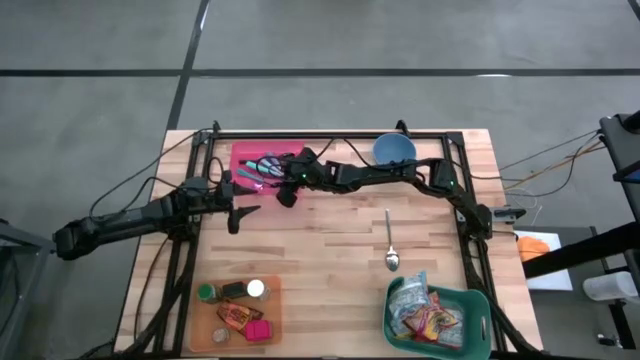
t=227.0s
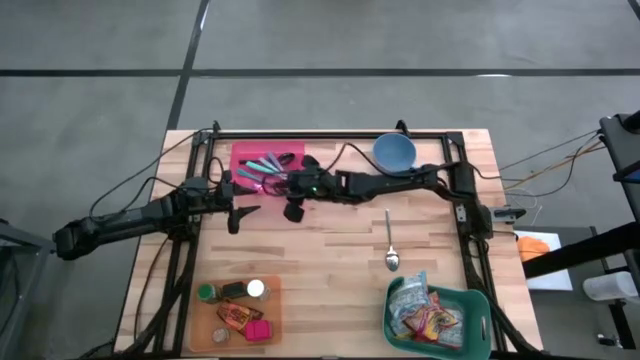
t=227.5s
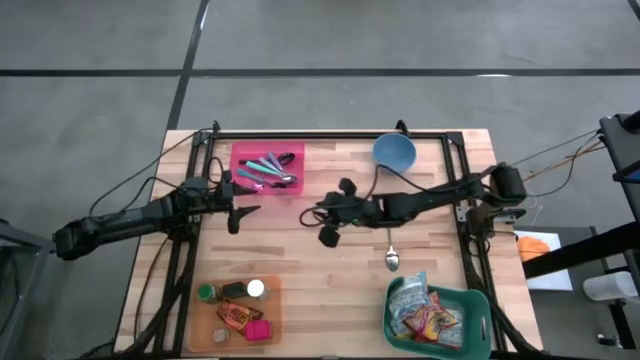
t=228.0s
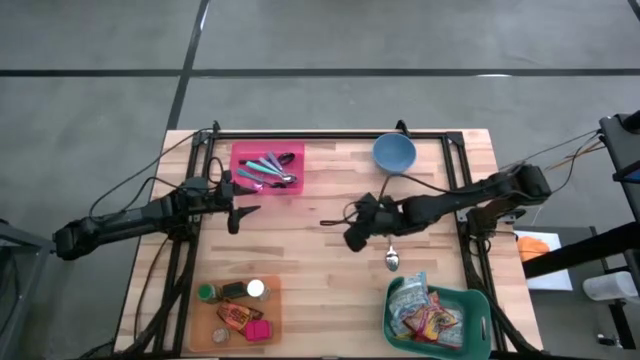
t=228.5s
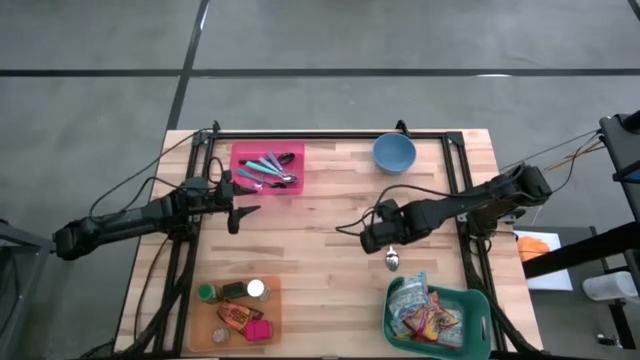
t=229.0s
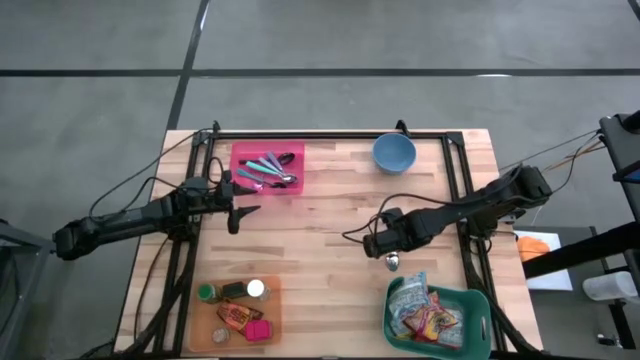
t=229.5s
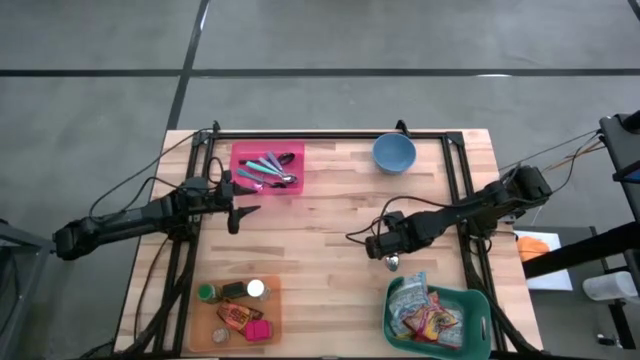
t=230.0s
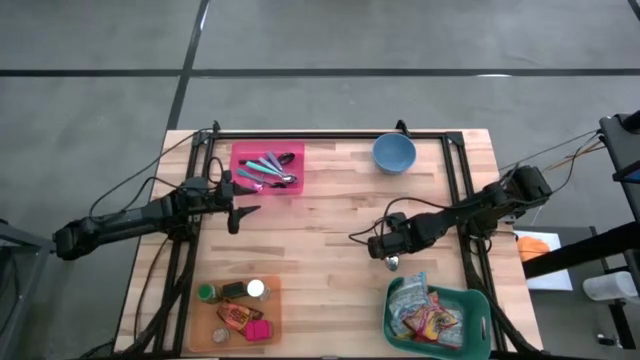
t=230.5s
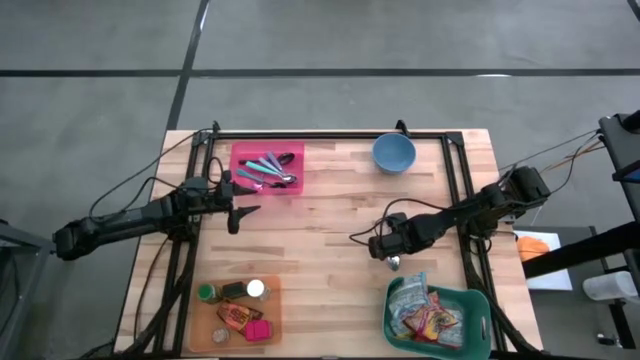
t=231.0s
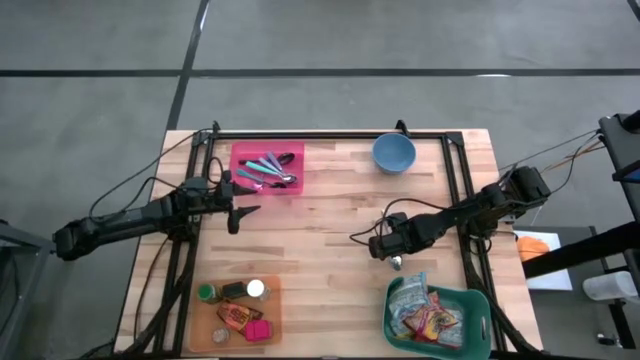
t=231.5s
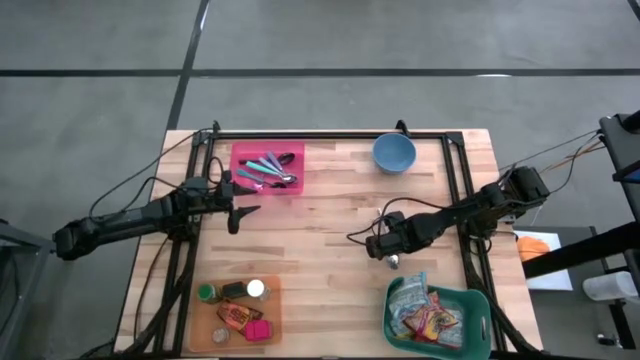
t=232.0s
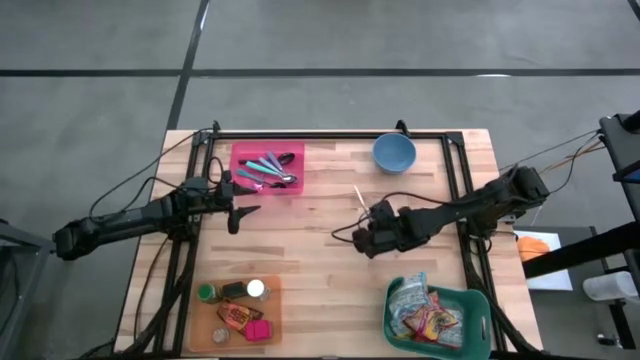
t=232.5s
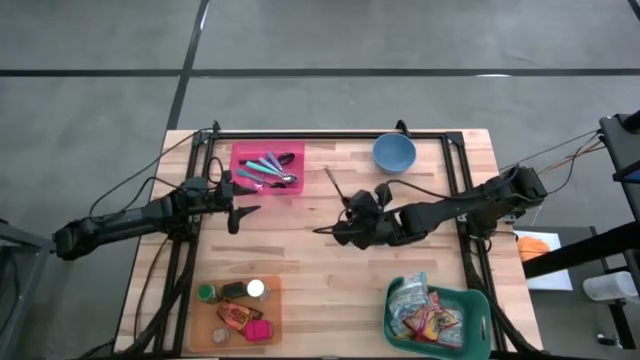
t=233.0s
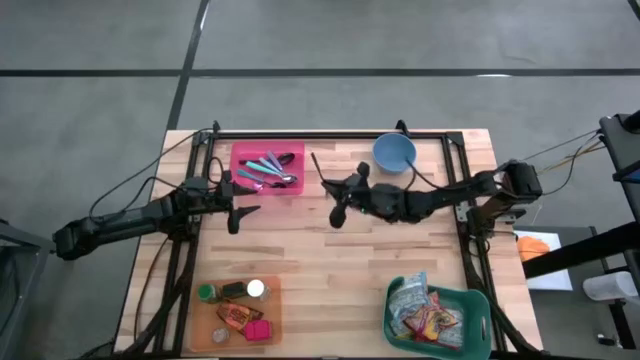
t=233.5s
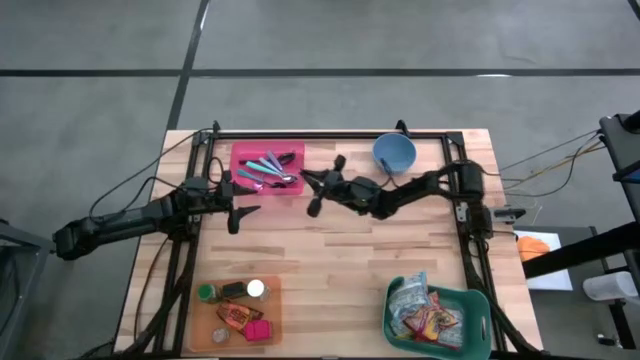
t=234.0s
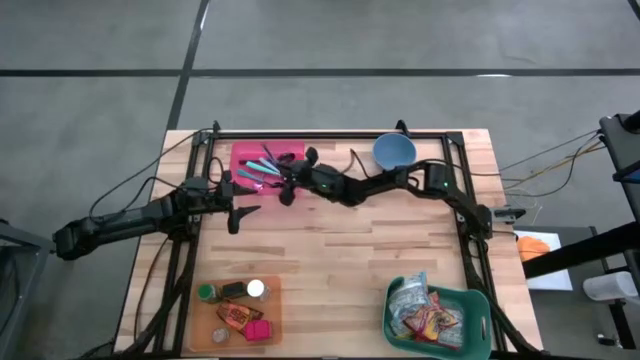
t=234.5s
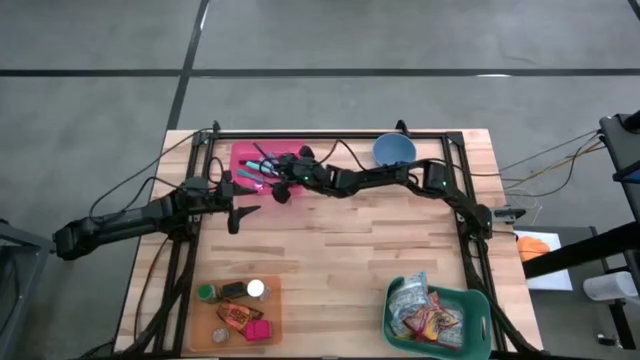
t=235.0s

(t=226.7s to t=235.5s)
Put the silver spoon into the pink bin

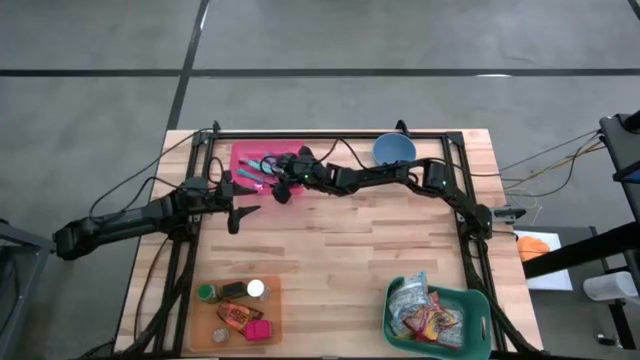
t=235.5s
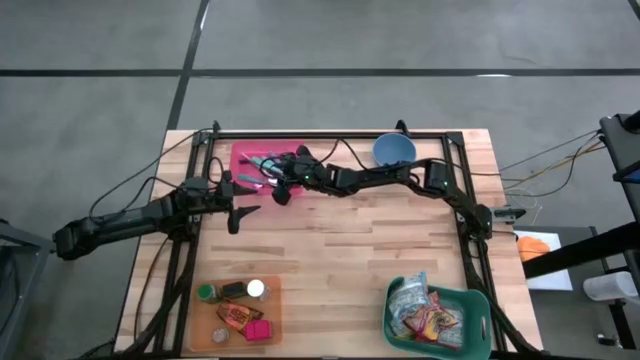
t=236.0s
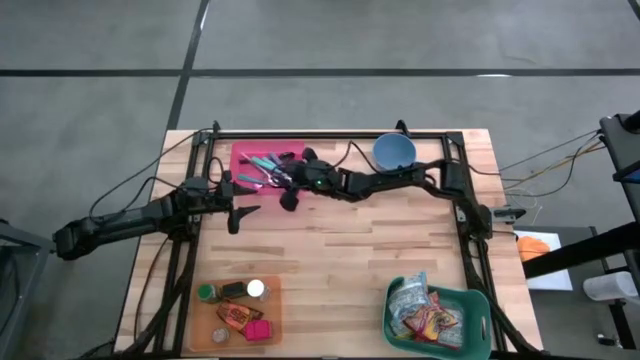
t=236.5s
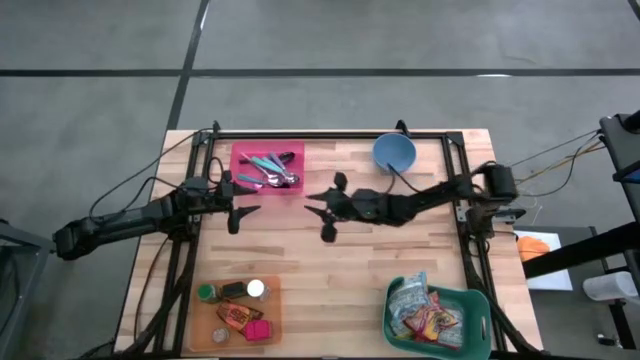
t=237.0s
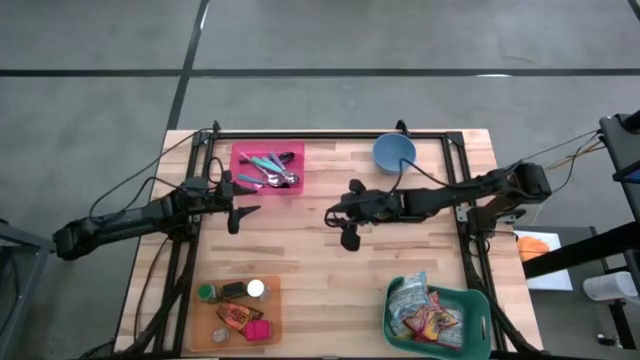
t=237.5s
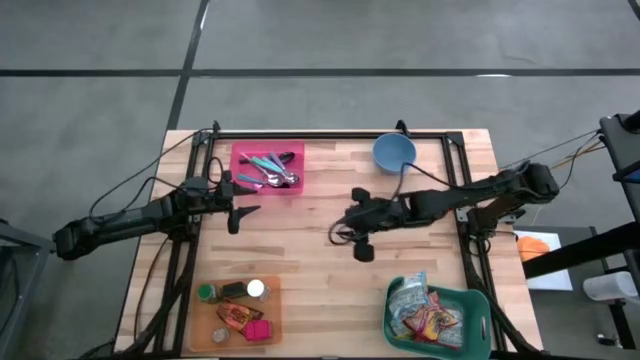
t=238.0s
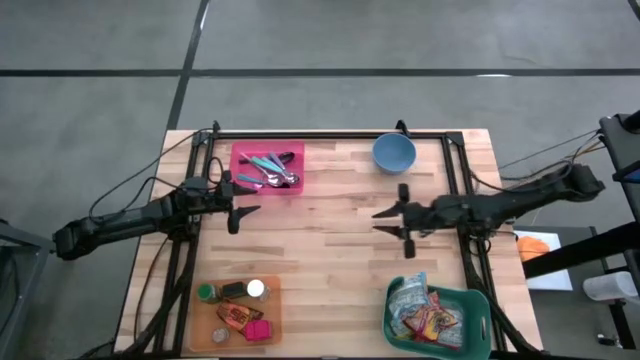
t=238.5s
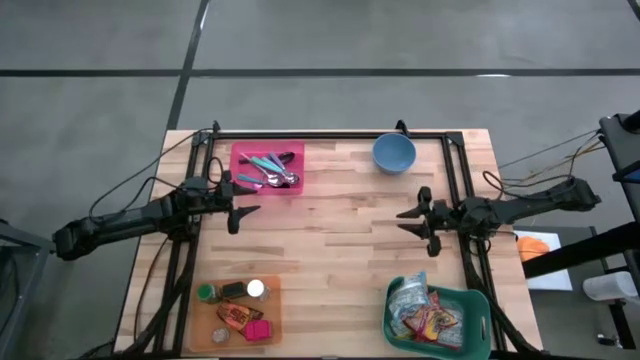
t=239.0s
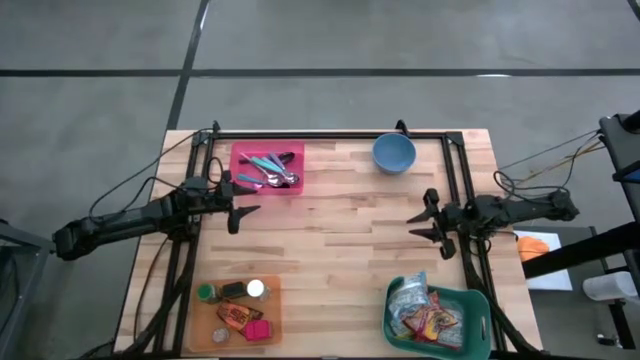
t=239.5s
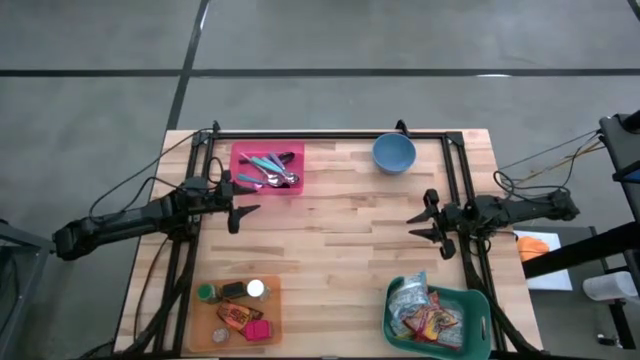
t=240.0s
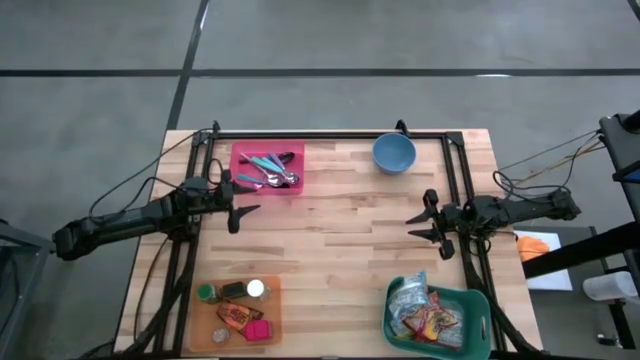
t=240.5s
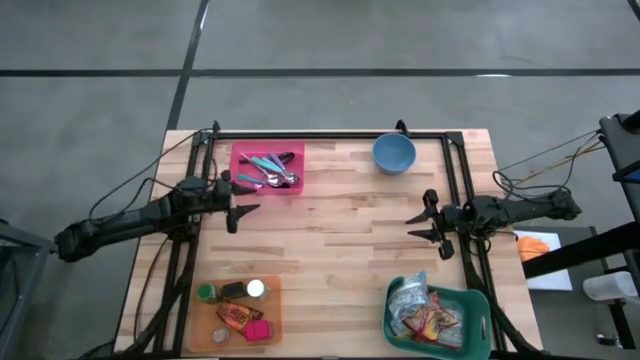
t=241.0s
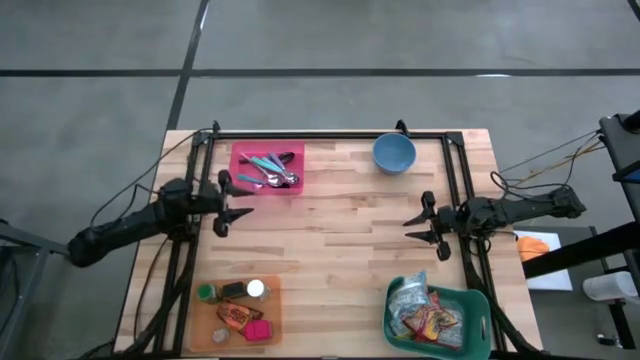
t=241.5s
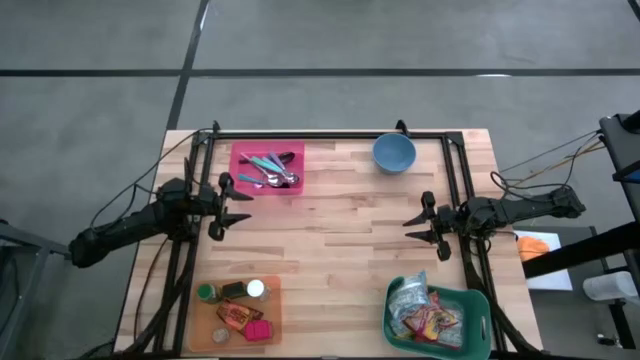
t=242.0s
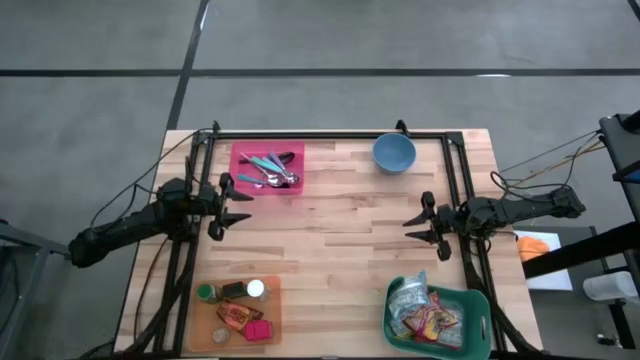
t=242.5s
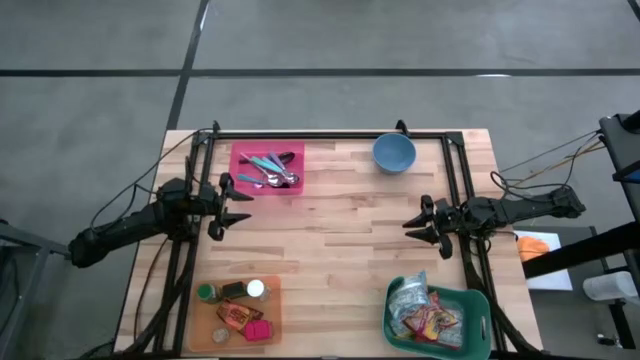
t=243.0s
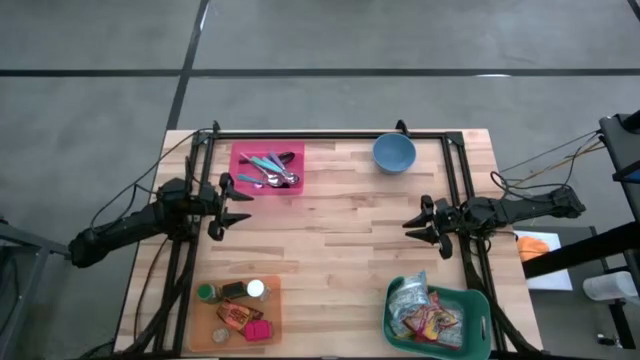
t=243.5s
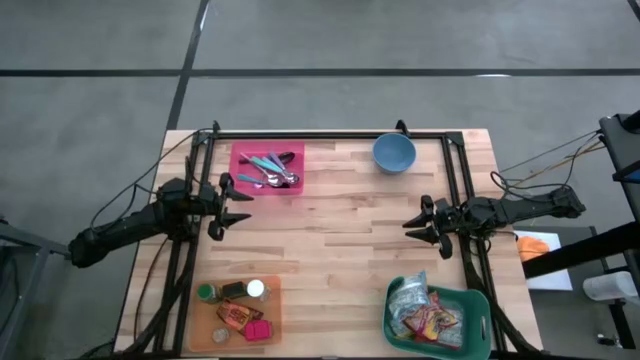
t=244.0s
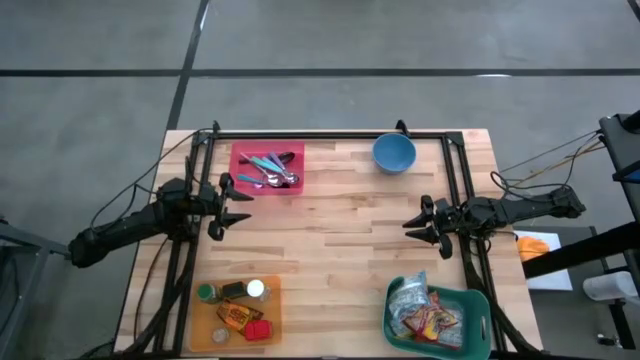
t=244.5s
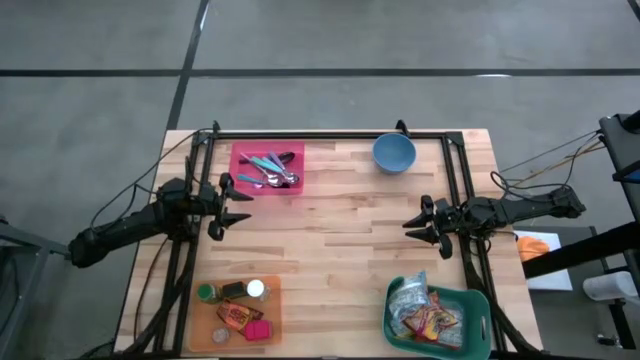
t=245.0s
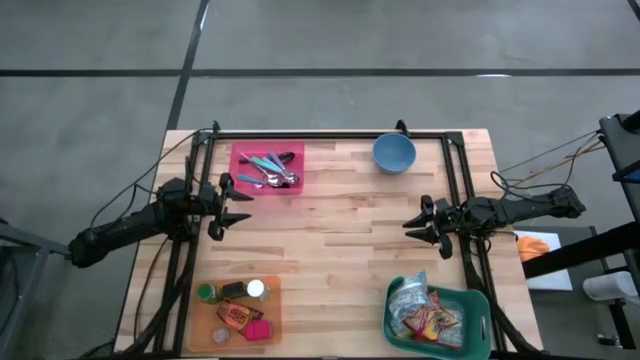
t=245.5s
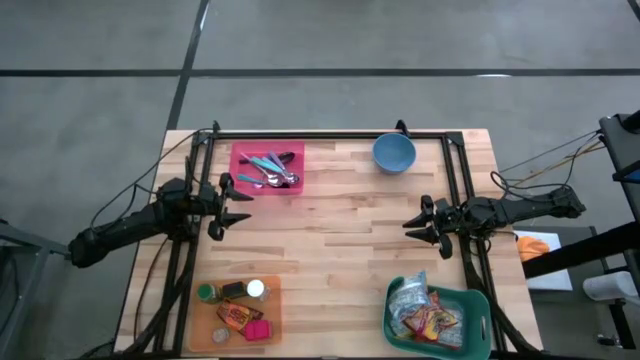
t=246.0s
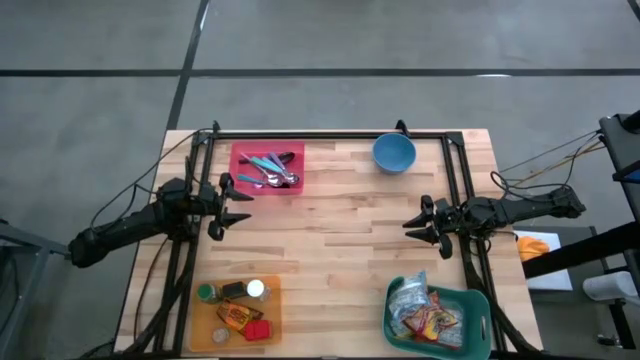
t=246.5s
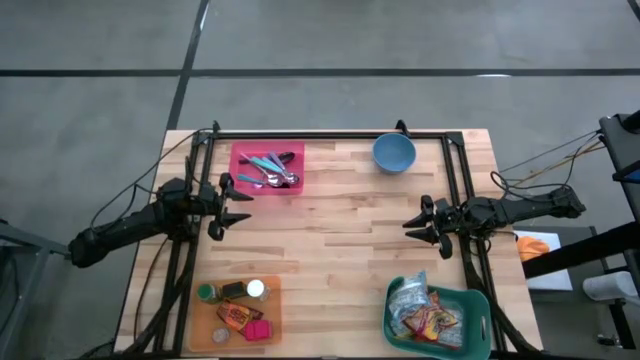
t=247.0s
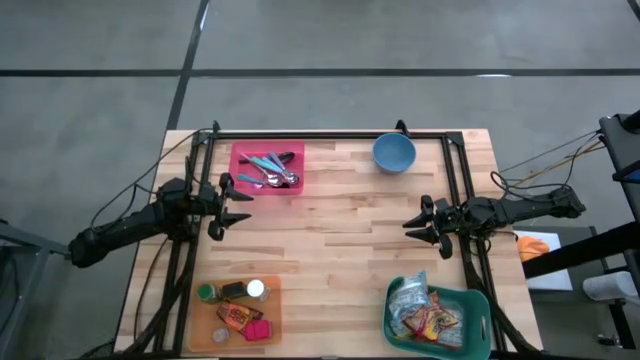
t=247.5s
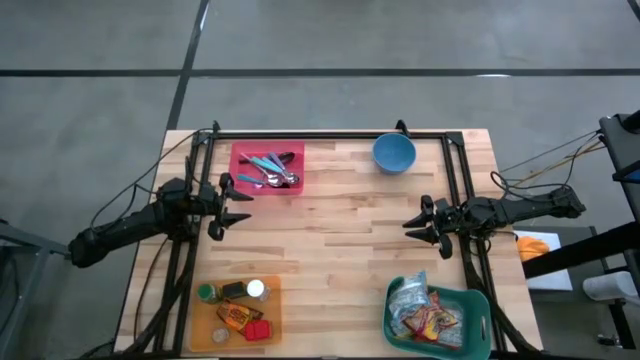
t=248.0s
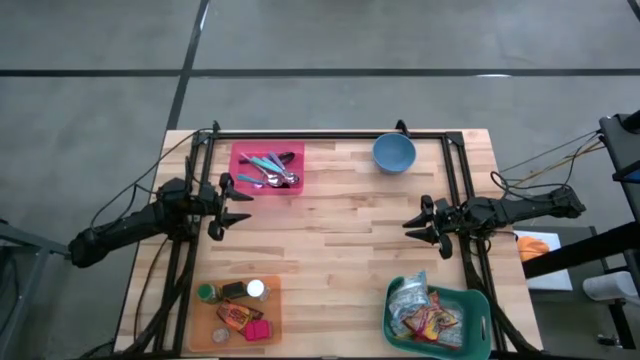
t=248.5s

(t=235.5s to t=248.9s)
Return to Home Position
